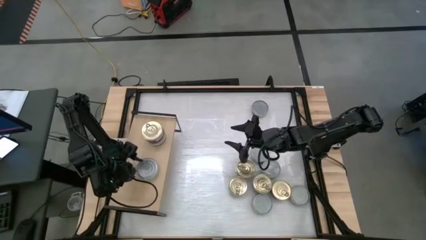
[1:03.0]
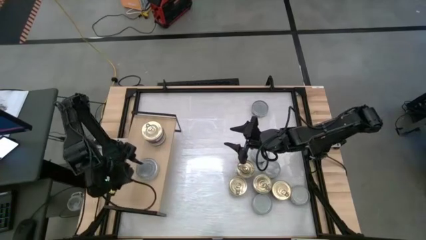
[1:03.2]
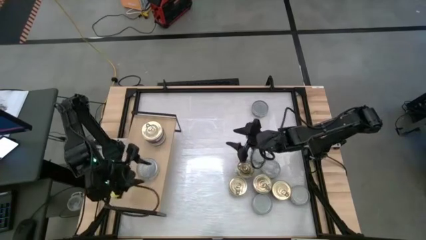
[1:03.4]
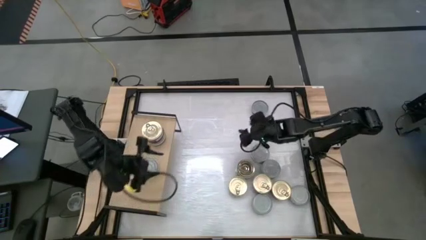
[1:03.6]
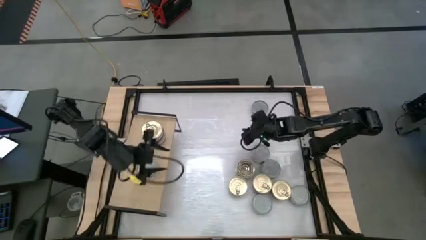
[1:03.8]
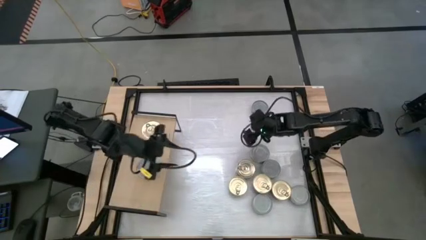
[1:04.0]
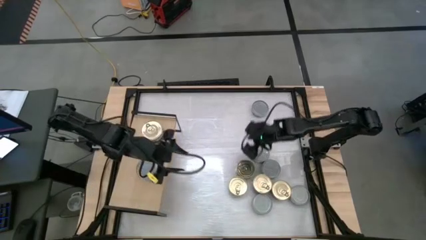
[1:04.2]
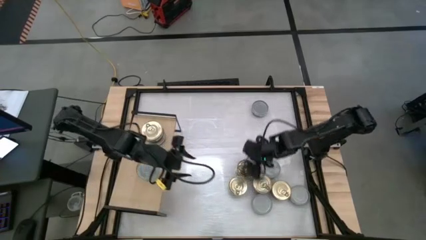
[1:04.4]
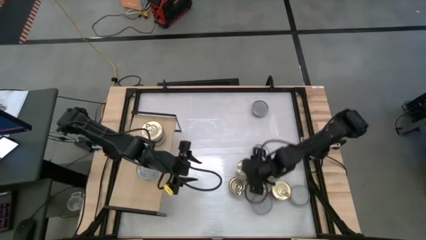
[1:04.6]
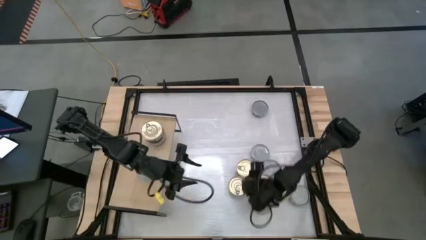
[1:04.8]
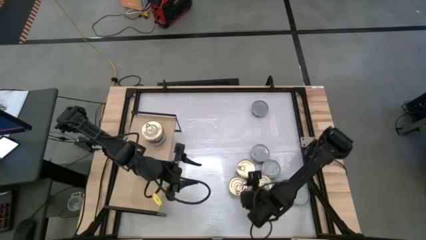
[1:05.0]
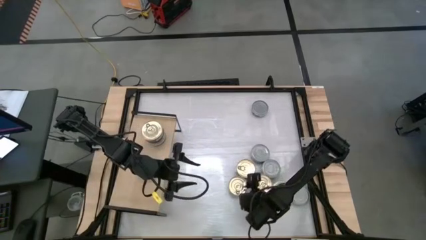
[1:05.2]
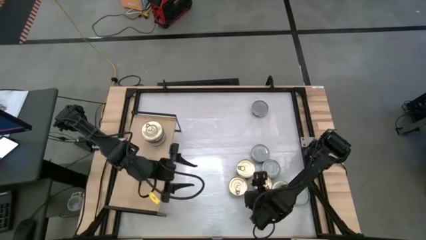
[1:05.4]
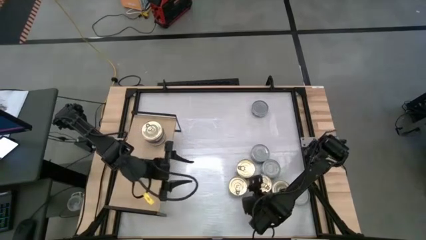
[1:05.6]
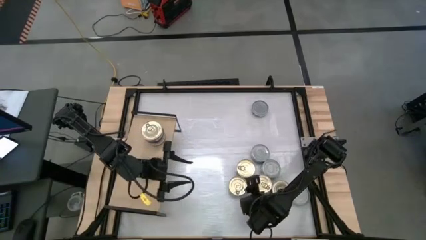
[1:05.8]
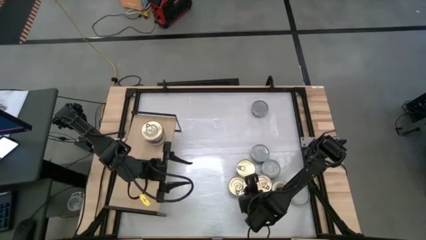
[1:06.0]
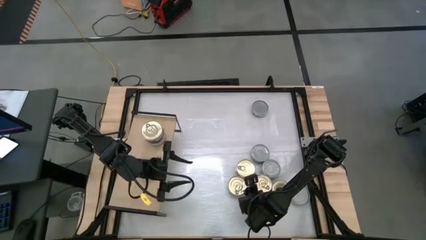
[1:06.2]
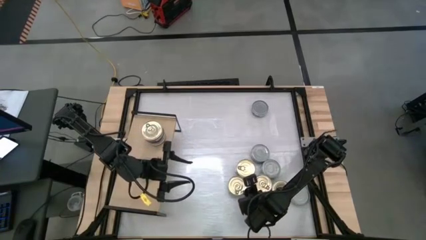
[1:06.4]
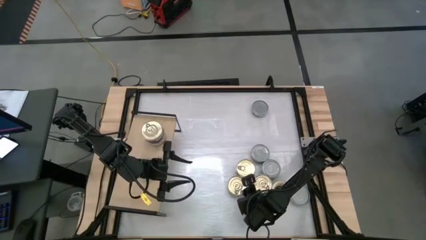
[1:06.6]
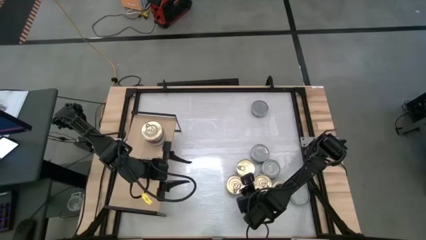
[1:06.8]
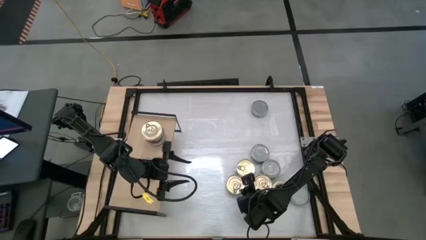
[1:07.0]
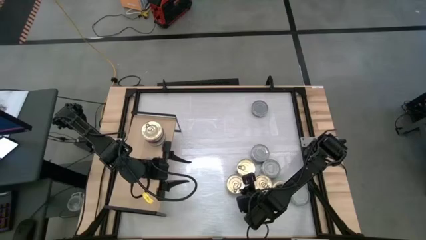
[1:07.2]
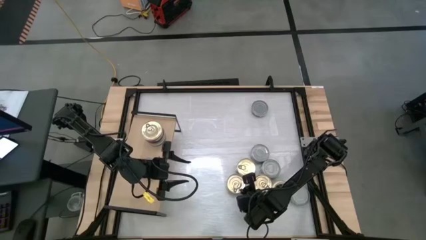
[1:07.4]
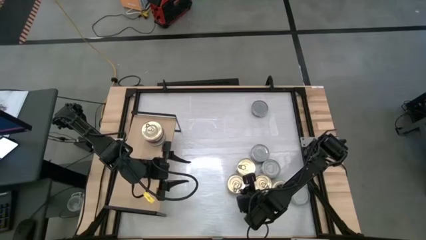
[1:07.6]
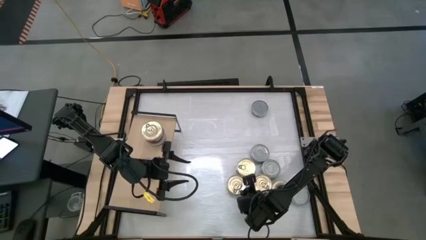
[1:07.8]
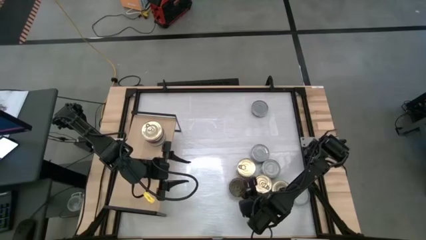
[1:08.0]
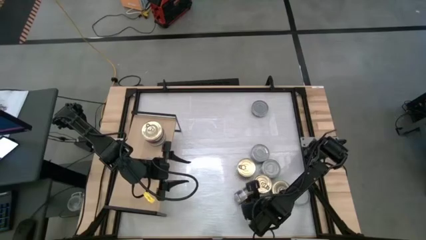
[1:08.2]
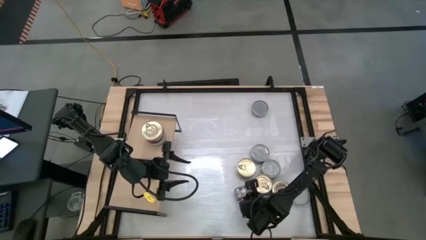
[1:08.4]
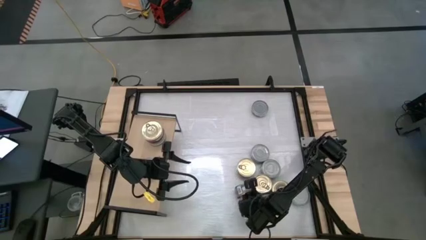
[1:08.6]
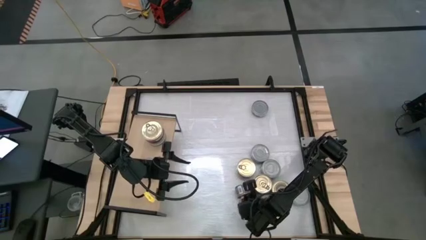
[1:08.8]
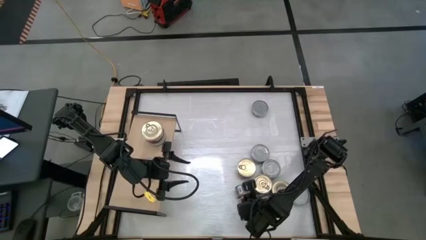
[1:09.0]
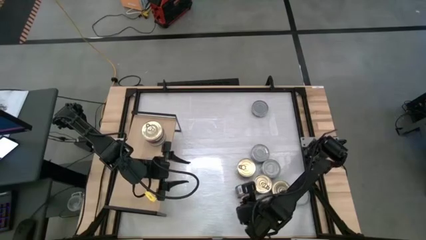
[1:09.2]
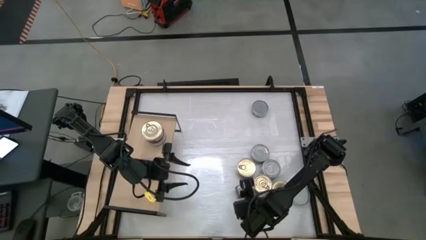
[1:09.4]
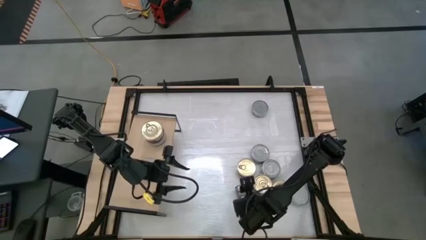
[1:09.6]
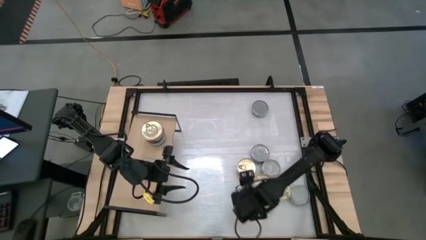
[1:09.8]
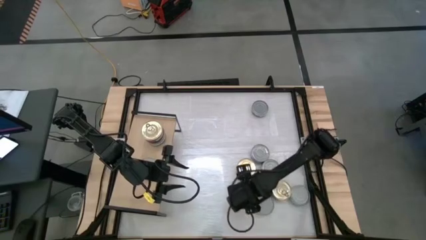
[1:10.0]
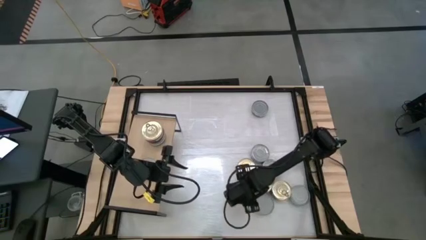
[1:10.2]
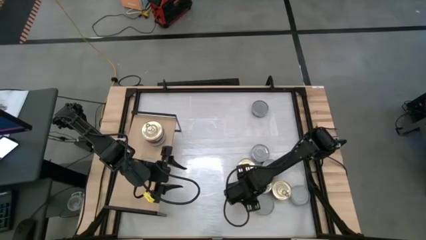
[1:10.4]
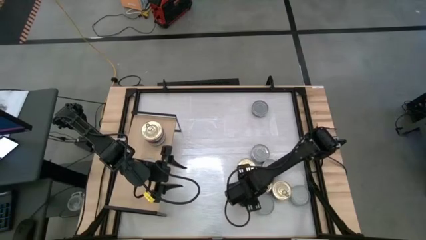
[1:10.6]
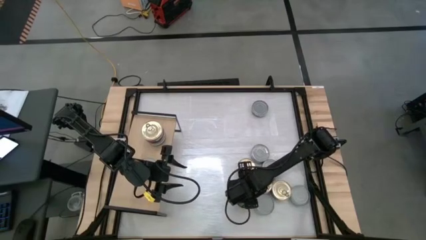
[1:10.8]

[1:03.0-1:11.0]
Task: Stack canned seafood by type on shelf
Stack the blue tuna can on top of the blue tuna can on the shelf

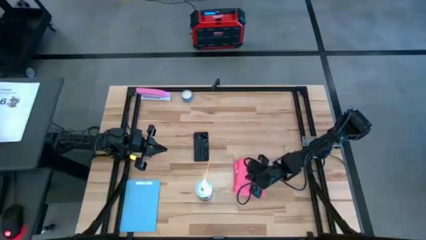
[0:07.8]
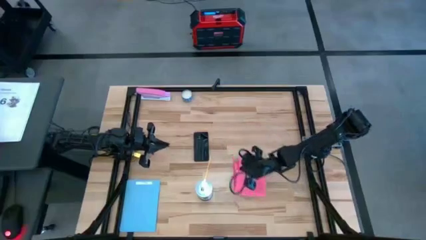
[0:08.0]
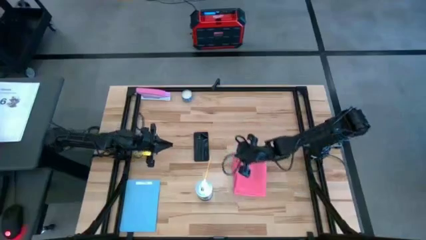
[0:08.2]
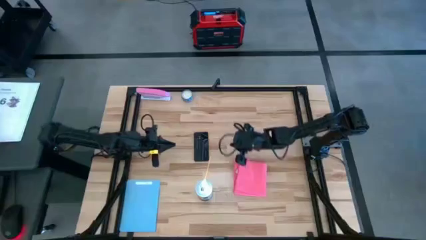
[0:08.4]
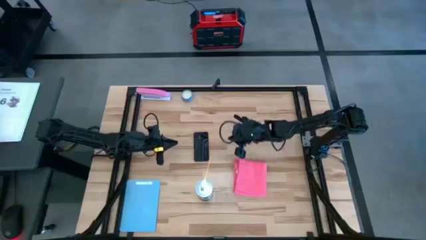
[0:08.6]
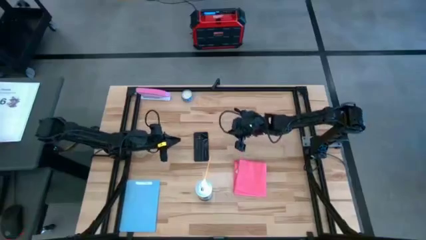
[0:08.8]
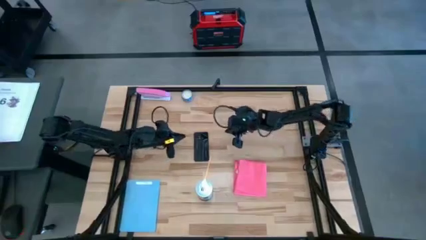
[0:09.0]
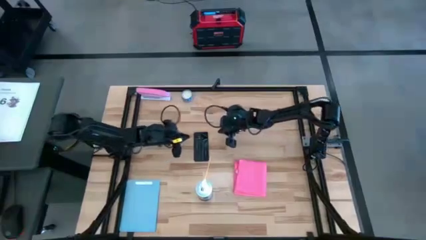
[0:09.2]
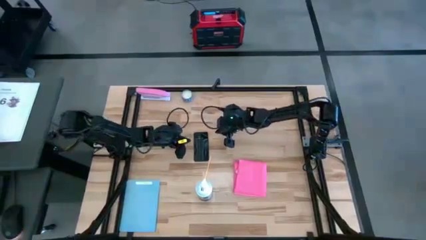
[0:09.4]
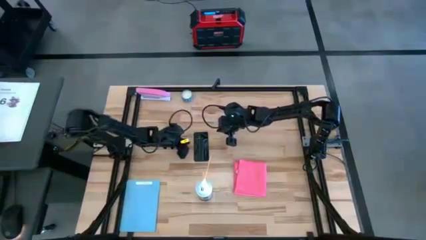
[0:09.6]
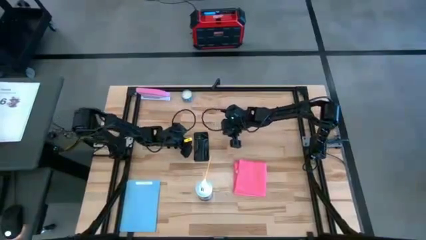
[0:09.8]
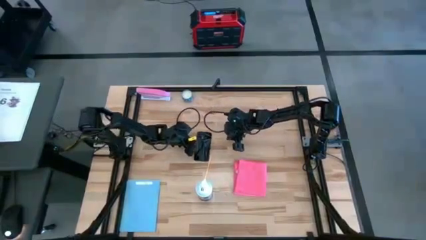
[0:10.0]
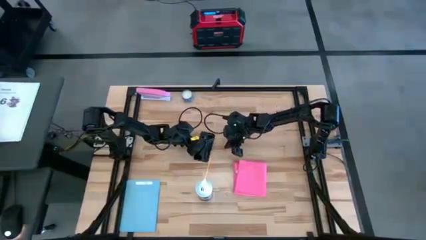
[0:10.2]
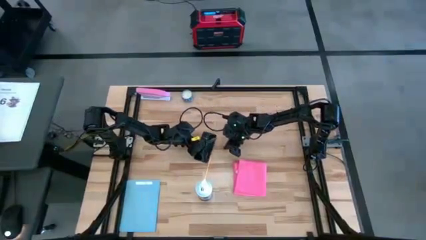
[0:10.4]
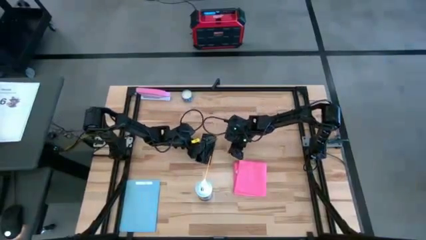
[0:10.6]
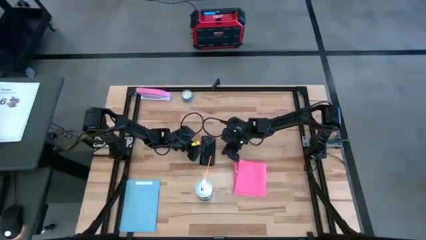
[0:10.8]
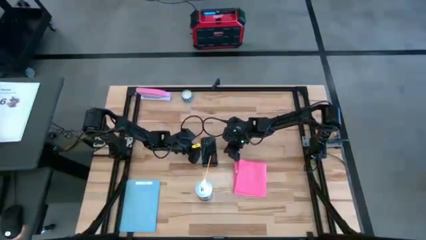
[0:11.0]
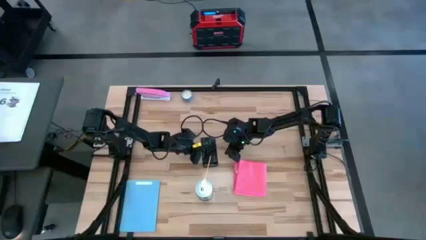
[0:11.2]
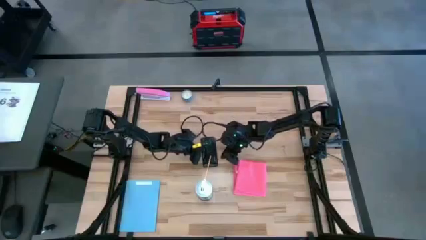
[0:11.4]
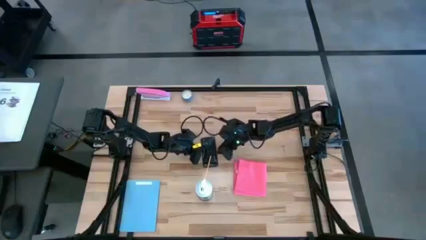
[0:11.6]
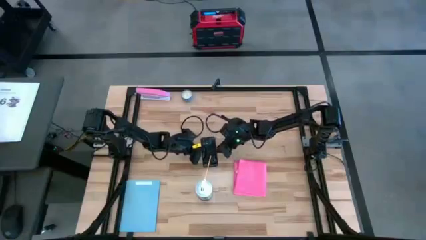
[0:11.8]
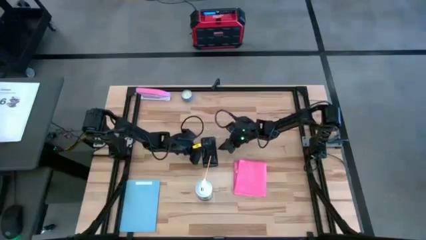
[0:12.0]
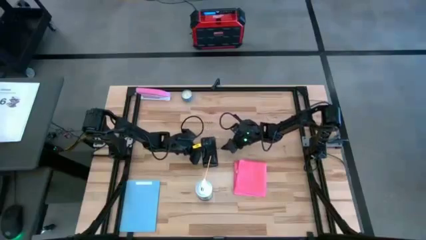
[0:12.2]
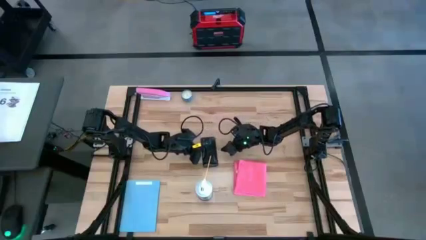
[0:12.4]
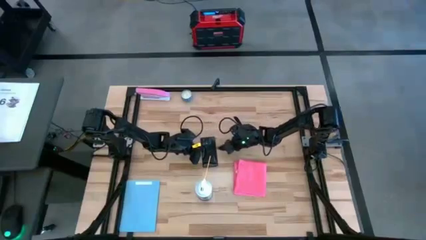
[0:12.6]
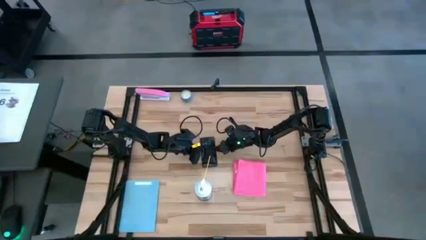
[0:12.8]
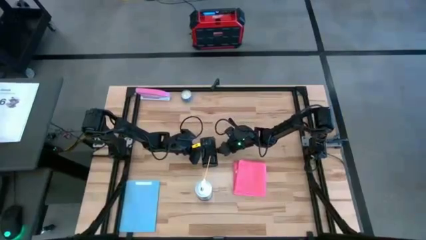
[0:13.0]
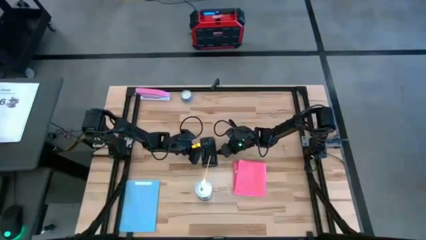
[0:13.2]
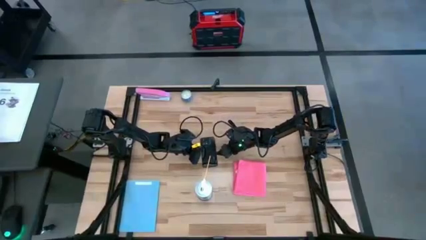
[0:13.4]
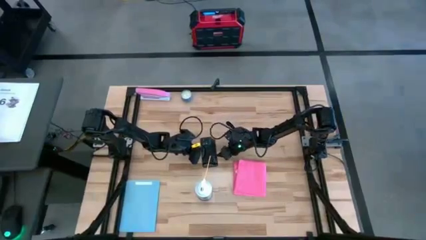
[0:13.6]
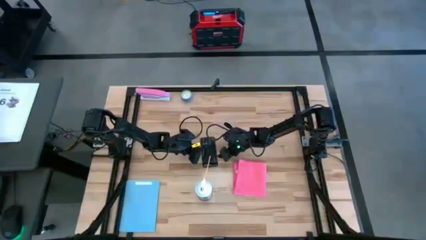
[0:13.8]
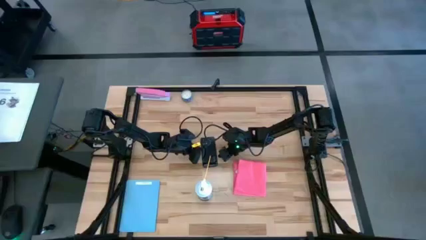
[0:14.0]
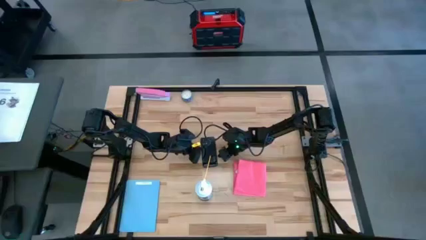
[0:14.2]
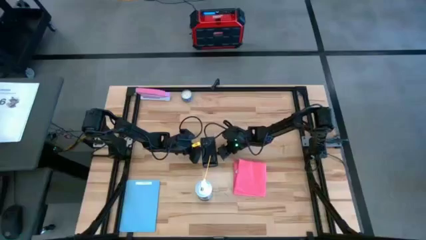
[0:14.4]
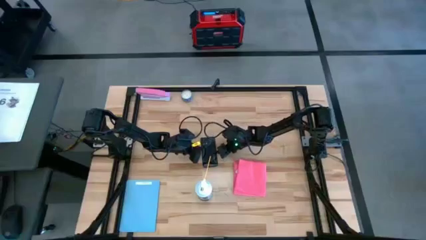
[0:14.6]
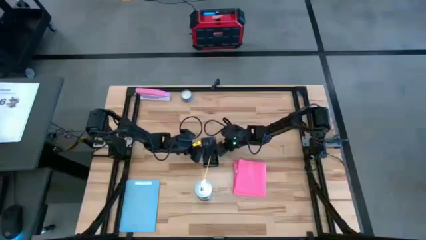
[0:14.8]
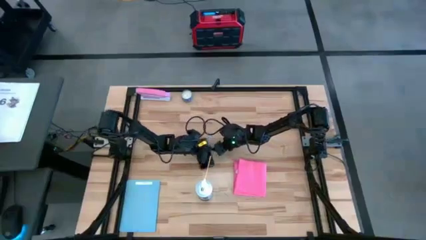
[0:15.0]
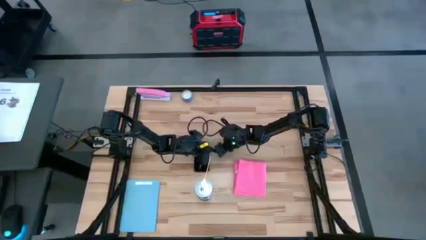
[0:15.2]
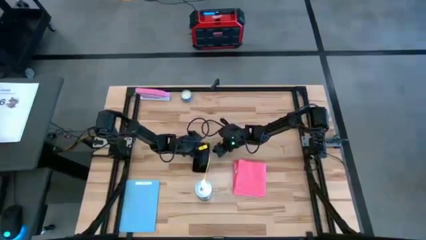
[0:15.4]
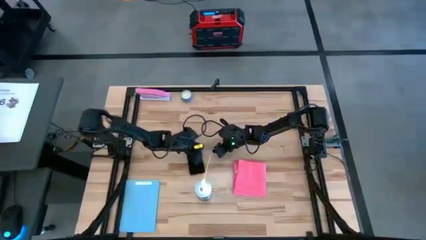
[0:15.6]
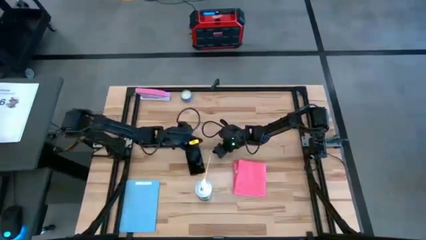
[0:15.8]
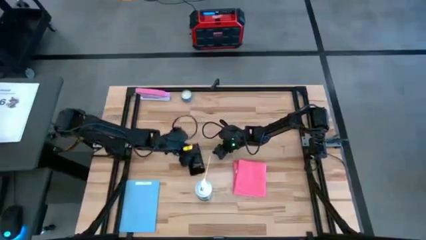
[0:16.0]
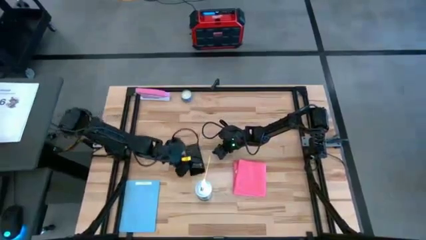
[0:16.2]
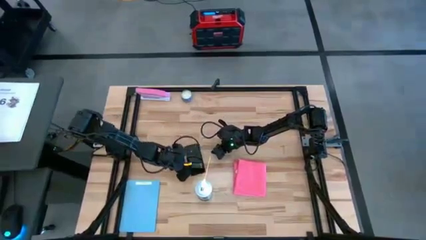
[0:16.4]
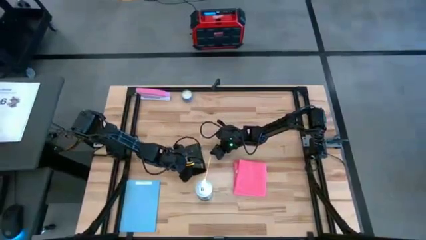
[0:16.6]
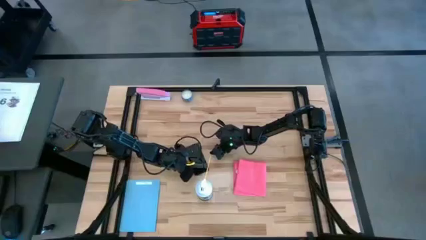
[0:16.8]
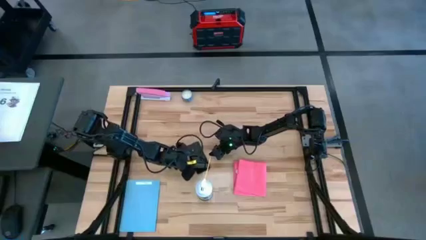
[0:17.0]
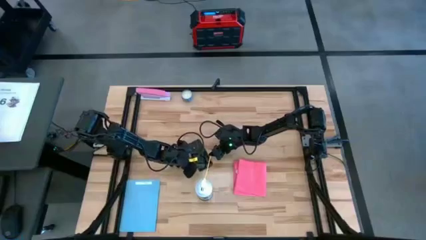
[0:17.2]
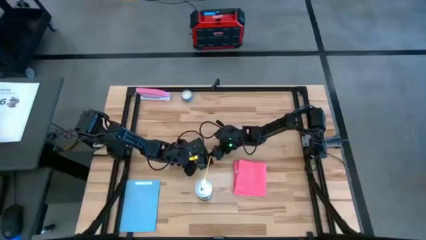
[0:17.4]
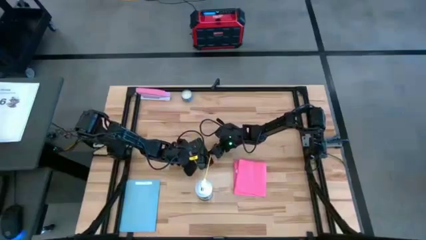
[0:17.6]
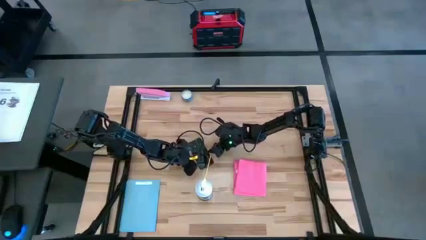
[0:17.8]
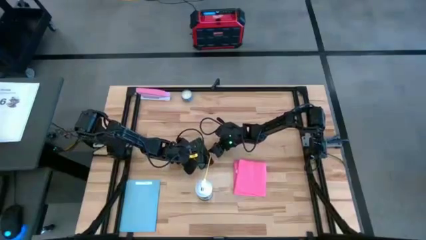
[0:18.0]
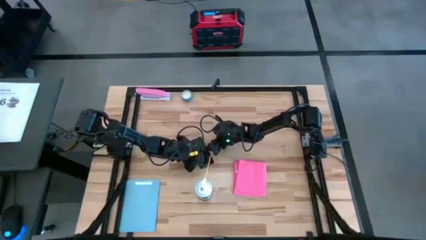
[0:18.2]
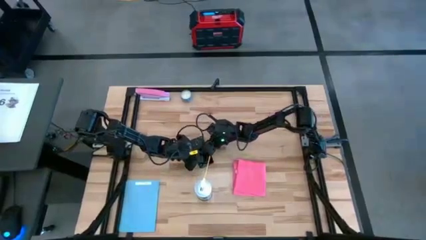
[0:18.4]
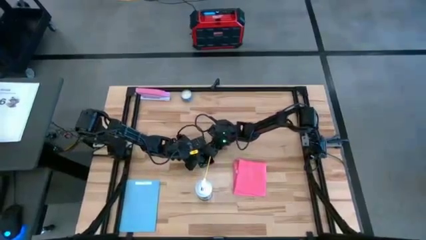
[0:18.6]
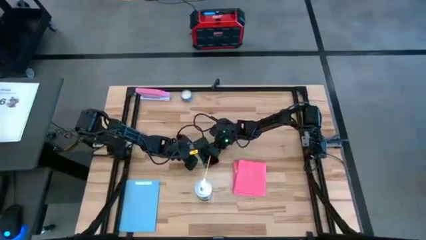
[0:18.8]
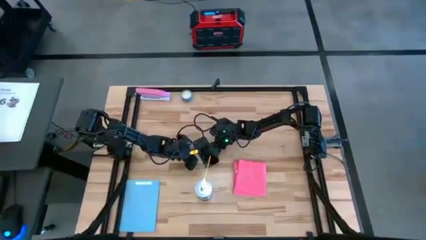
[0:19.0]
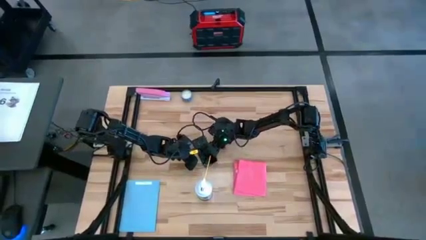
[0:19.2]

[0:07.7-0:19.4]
Task: Apply microfiber cloth
Spray the back of the black cellphone using the spray bottle
